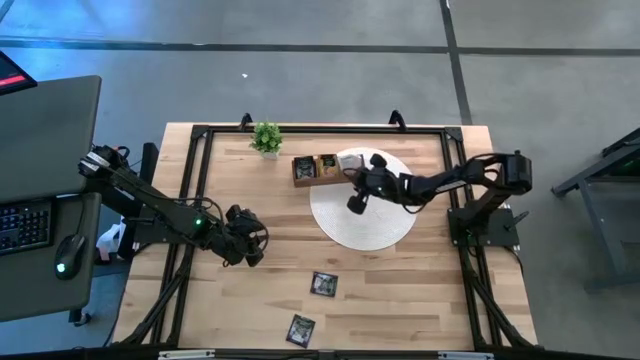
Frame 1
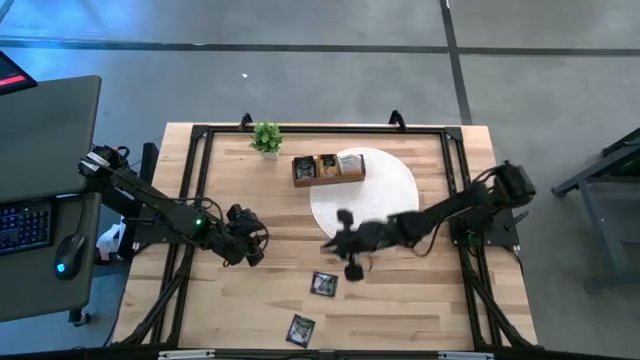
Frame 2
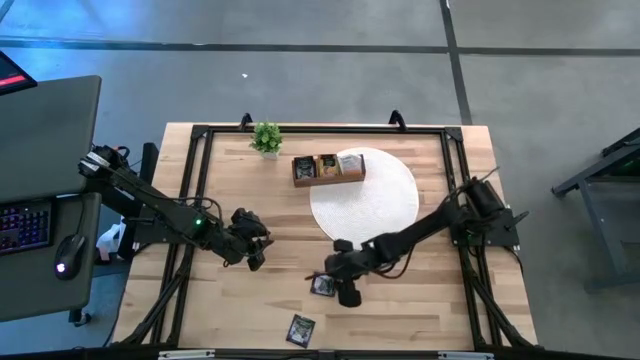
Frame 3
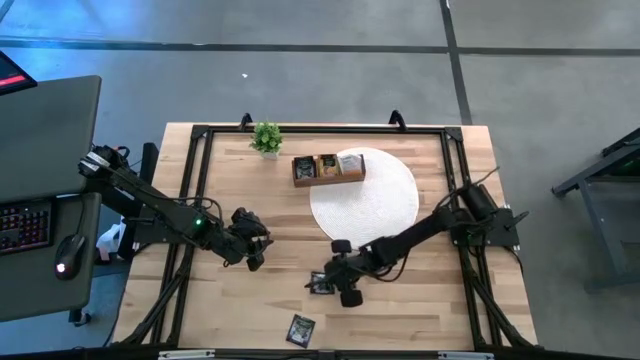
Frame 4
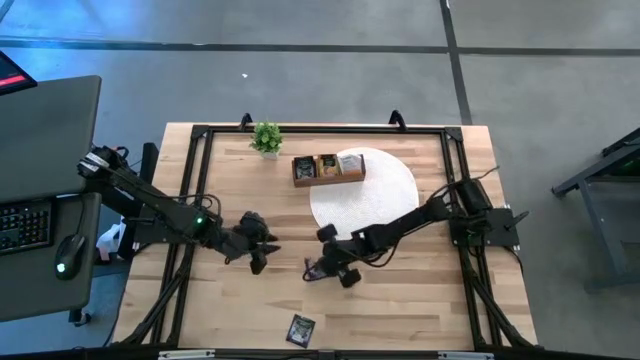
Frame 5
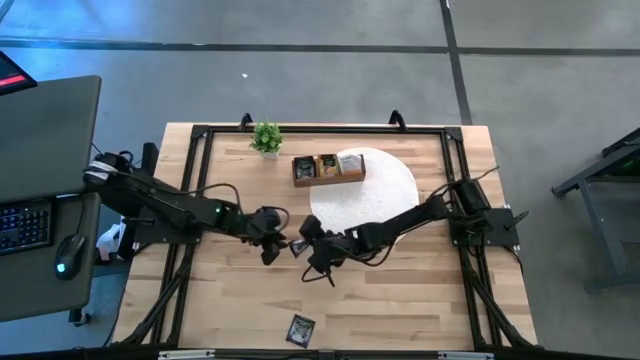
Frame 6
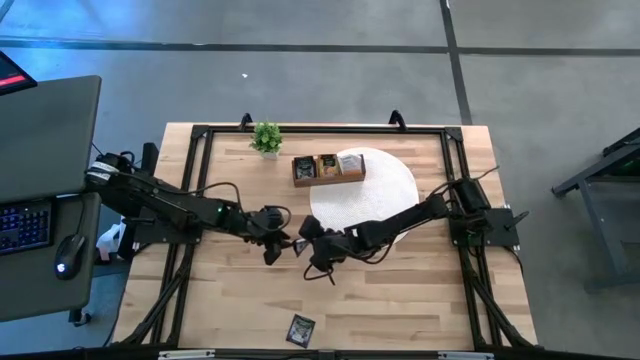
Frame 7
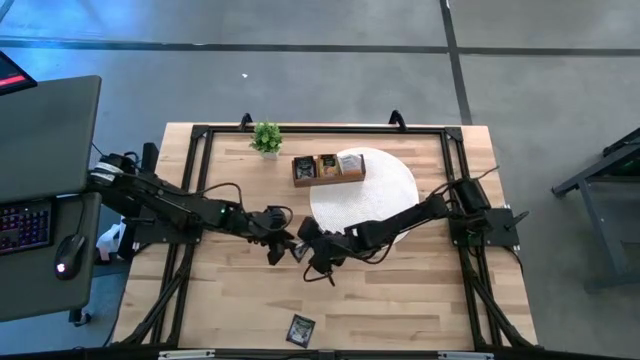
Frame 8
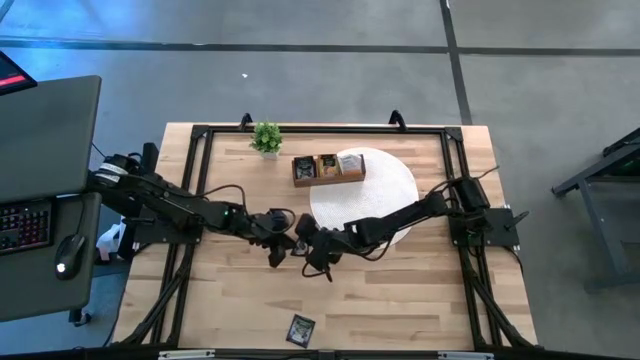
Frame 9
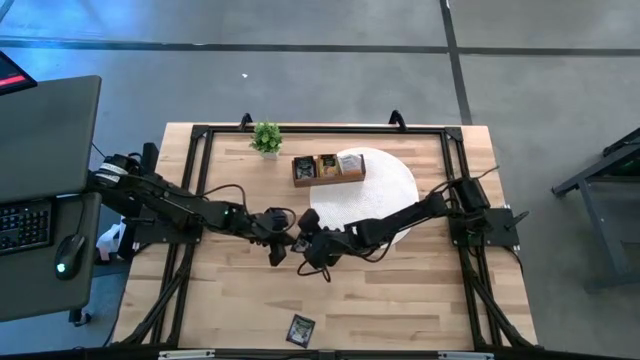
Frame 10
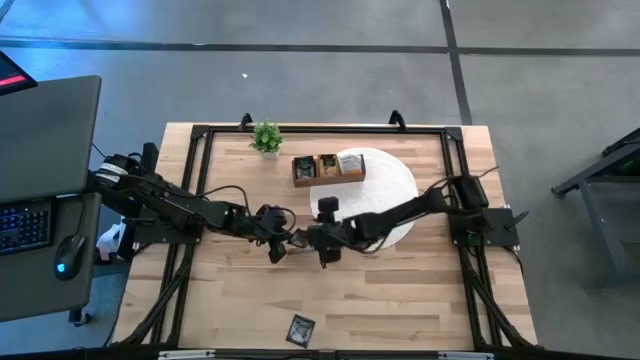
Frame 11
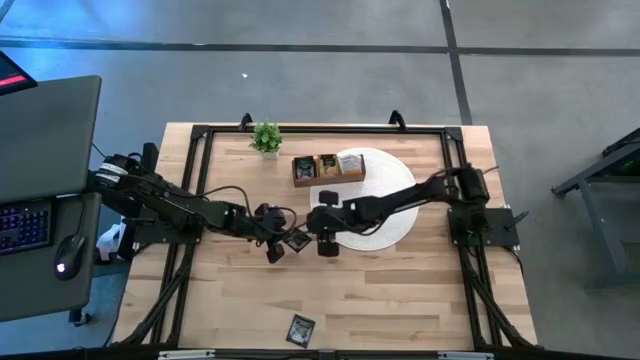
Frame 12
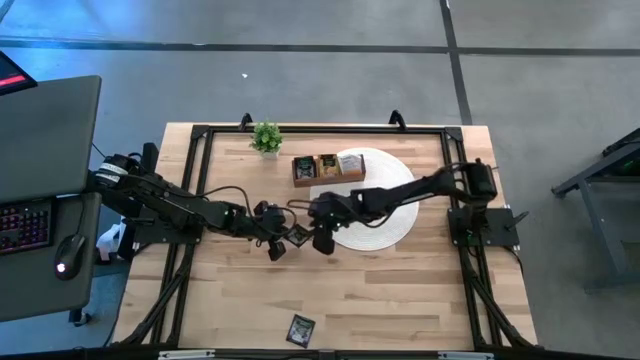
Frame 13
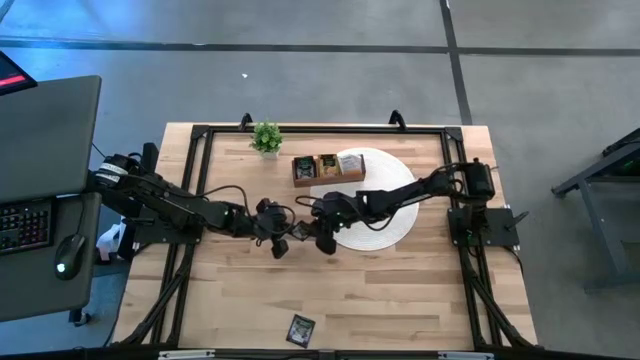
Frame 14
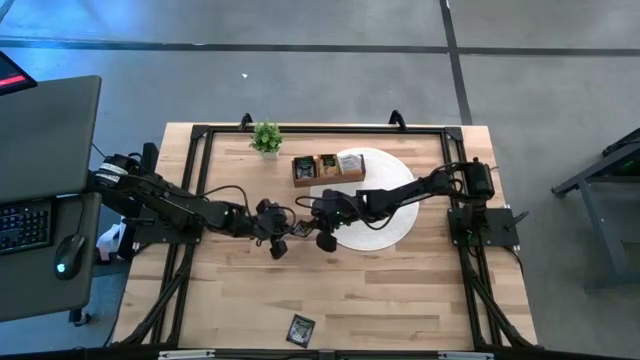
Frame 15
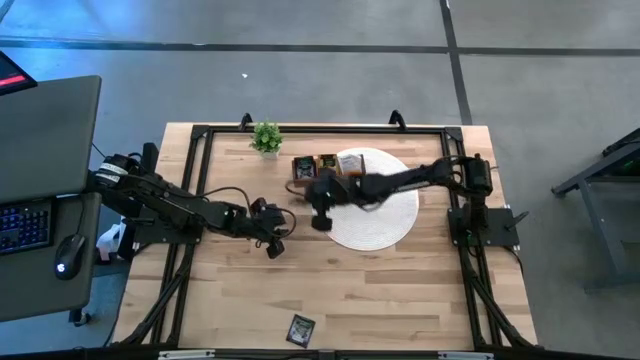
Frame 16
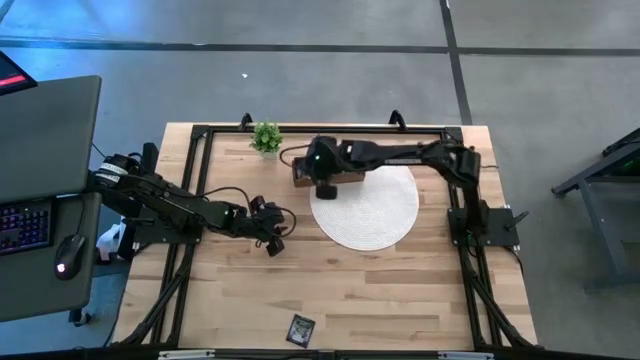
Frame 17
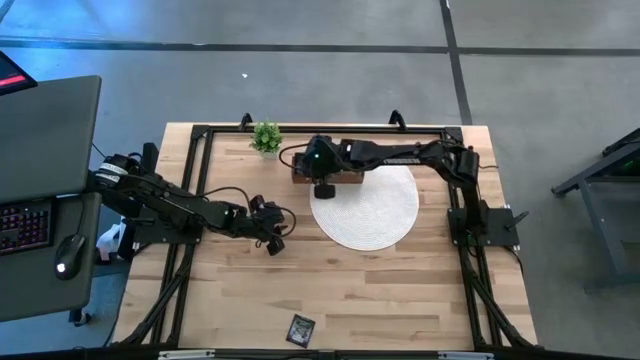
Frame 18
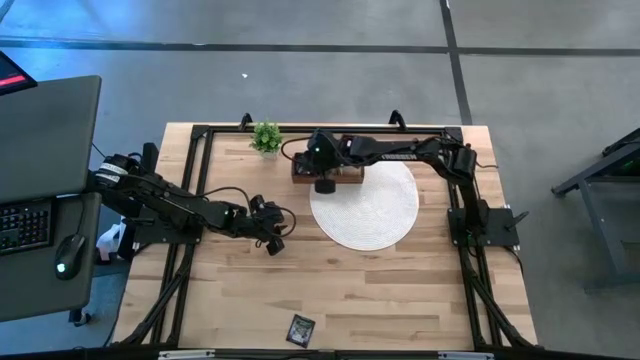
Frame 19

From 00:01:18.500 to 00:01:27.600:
Task: Pick & Place Tea
Put the violet tea bag into the left section of the wooden organizer

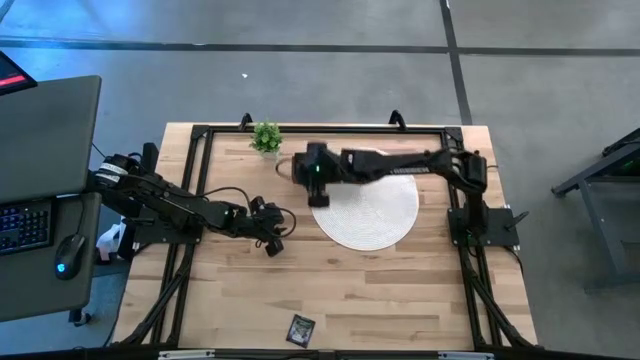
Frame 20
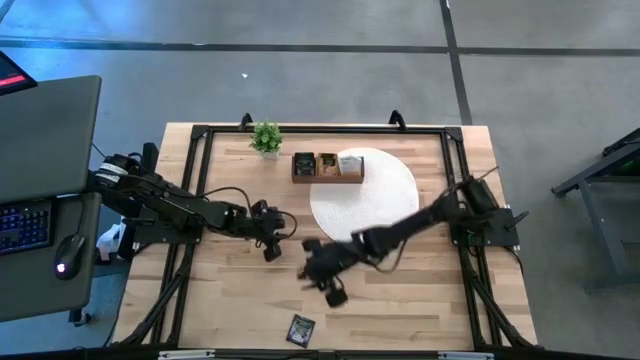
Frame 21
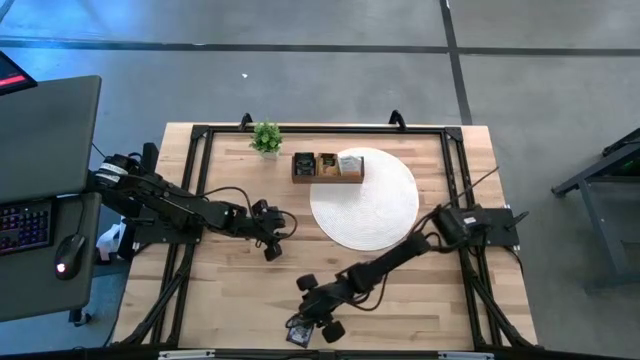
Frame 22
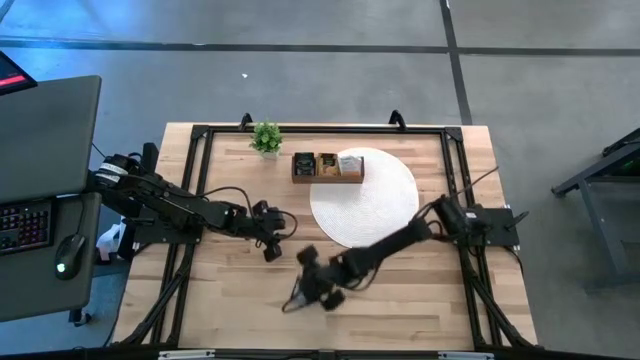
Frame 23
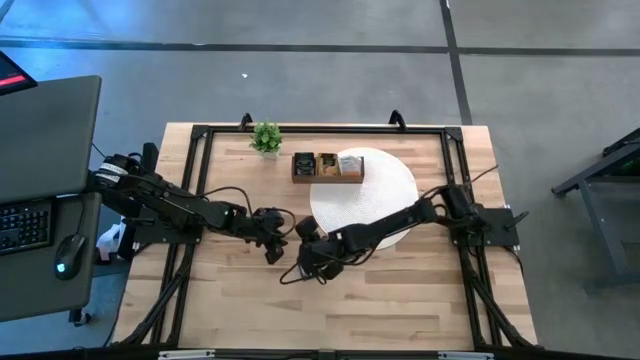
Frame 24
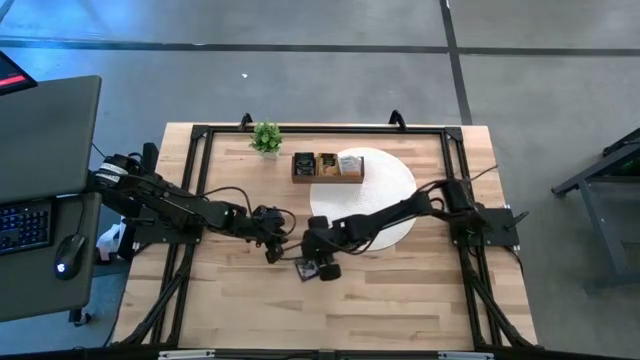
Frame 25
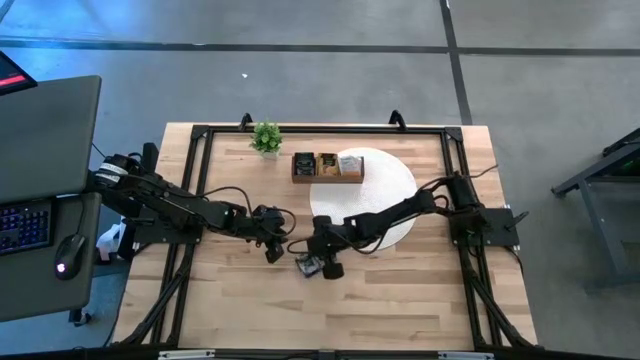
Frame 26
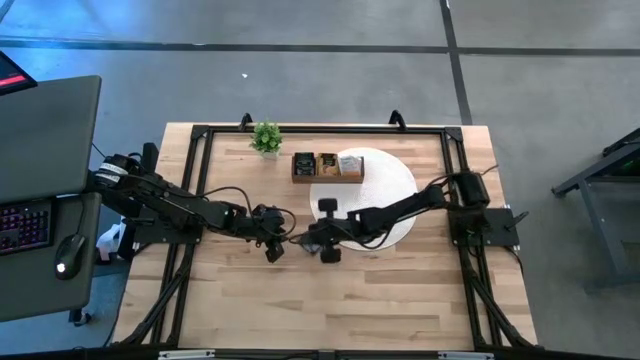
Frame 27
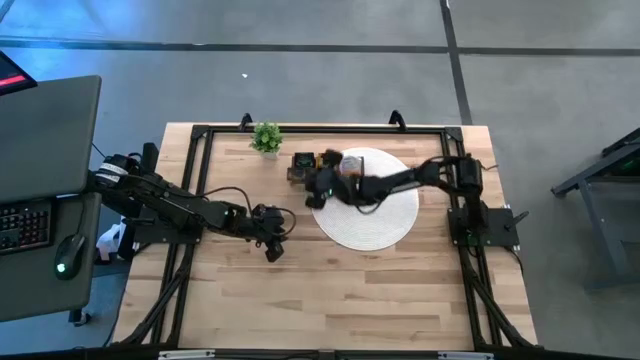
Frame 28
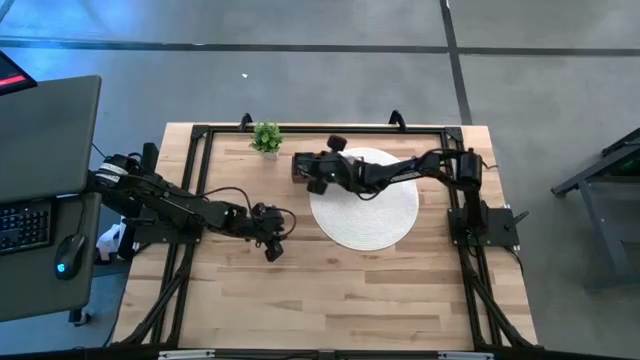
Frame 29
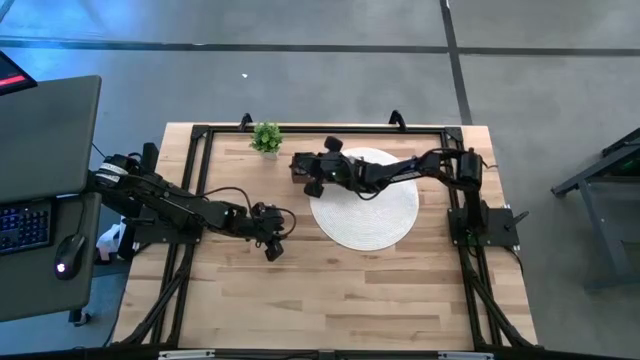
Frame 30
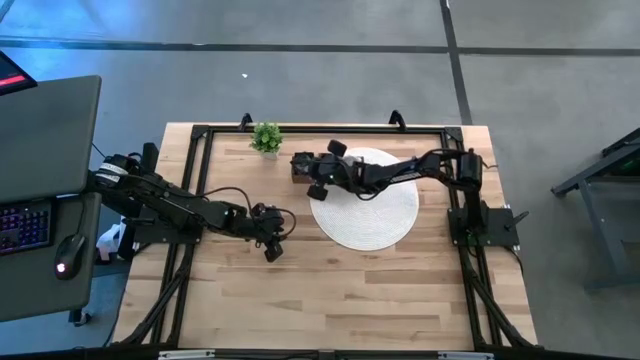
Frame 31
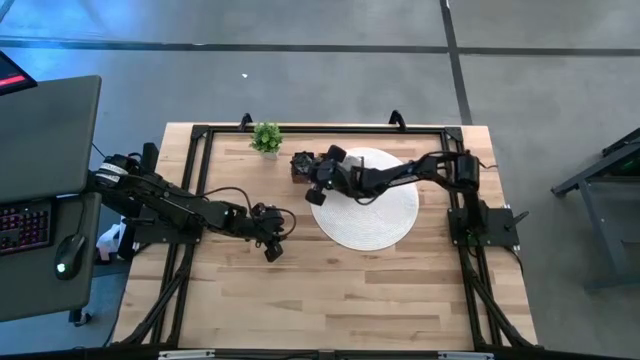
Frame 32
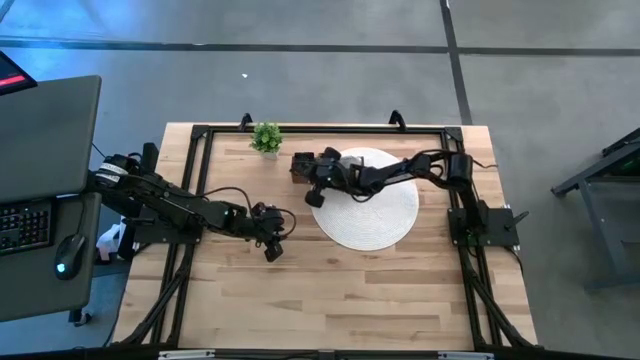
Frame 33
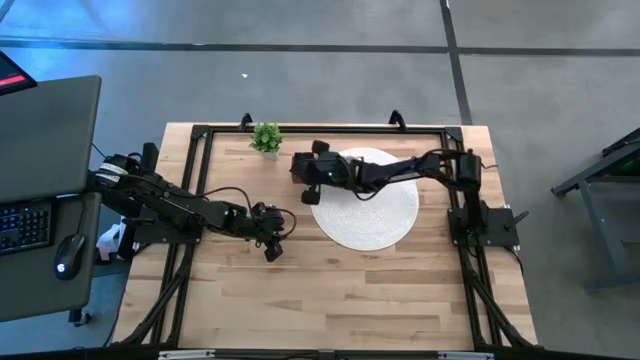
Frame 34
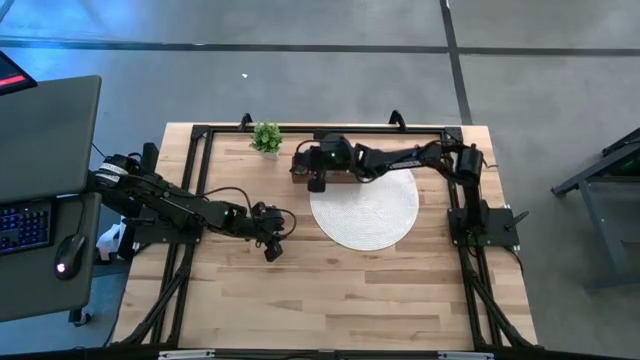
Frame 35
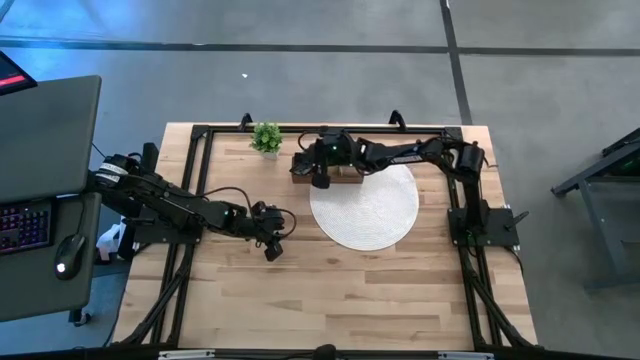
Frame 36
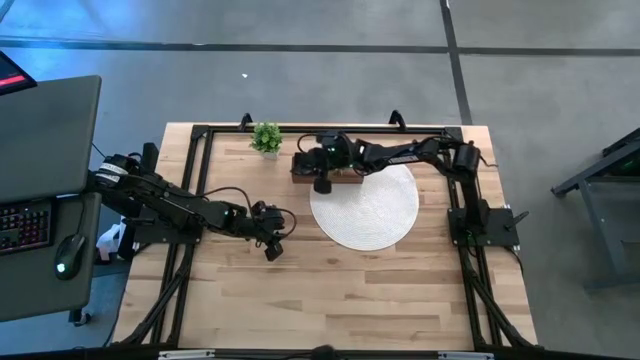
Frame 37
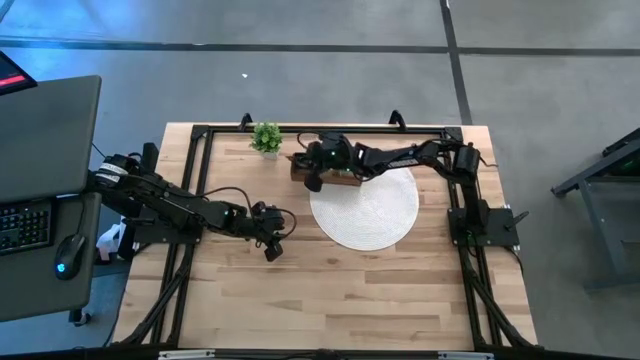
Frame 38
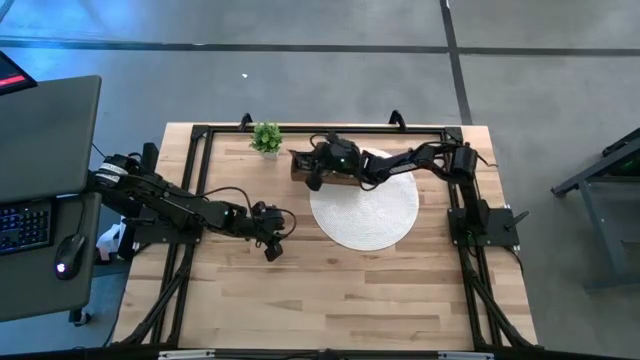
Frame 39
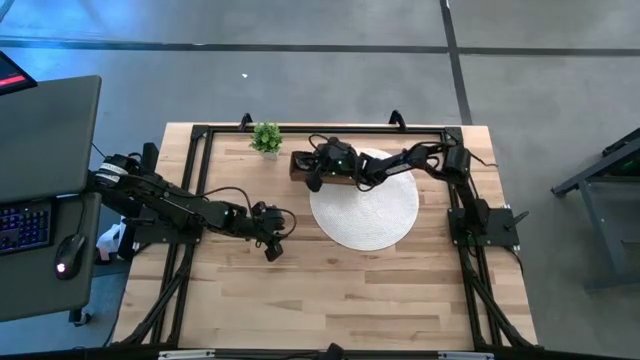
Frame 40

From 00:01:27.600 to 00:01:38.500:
Put the violet tea bag into the left section of the wooden organizer

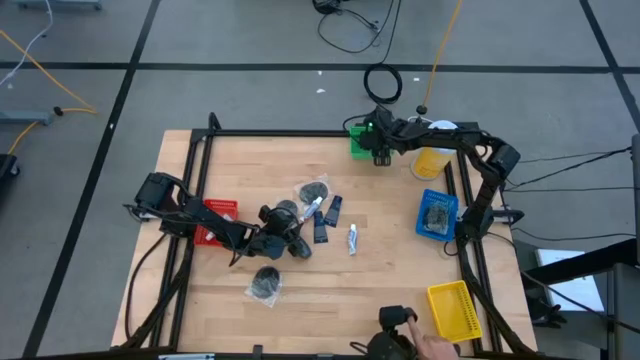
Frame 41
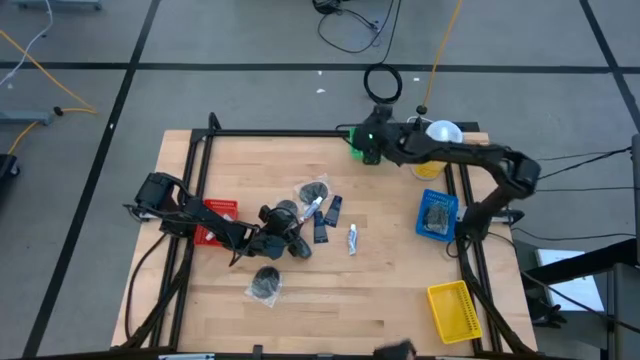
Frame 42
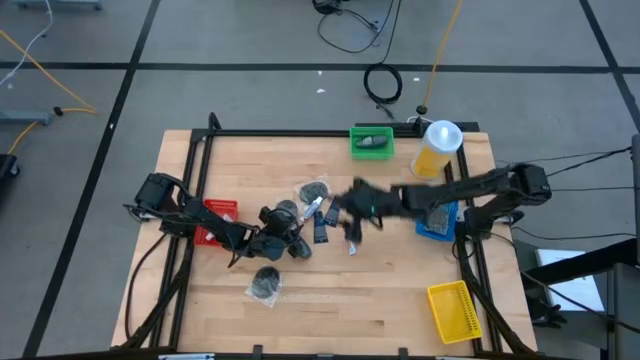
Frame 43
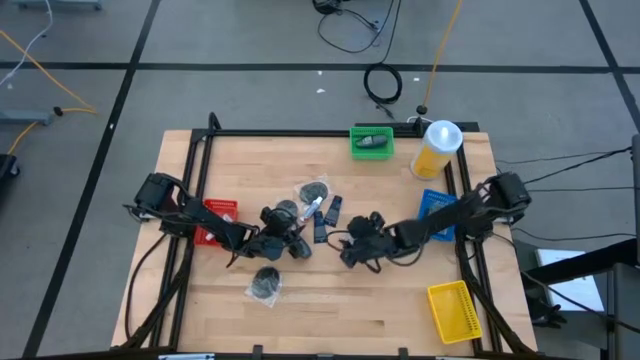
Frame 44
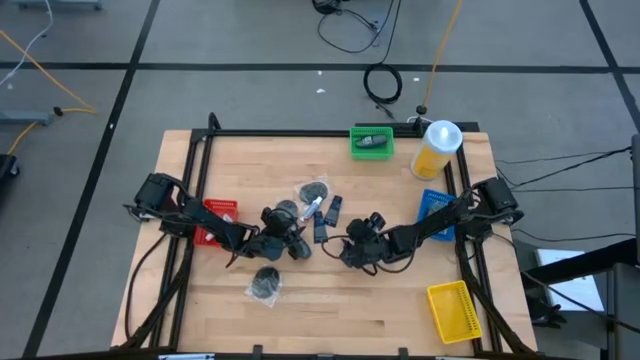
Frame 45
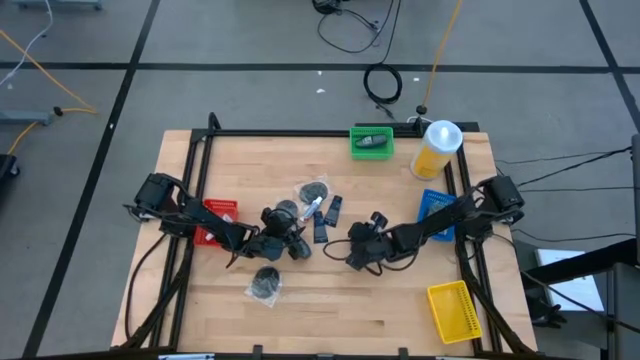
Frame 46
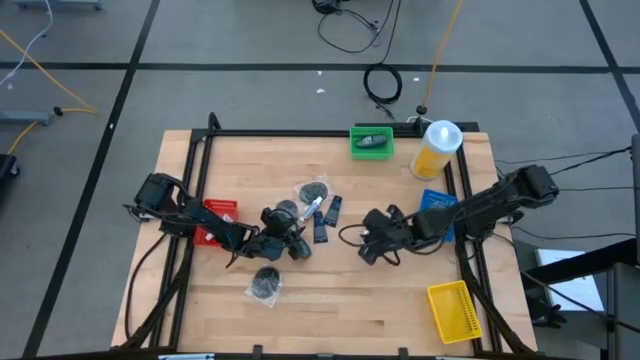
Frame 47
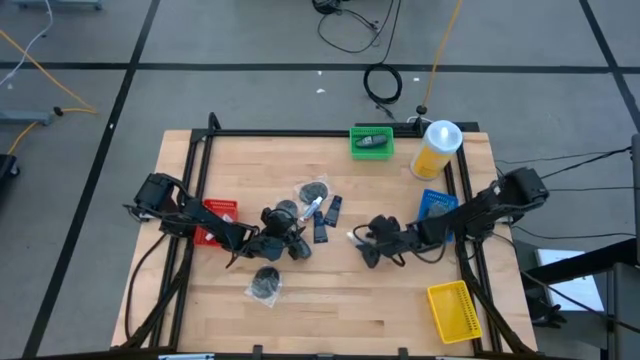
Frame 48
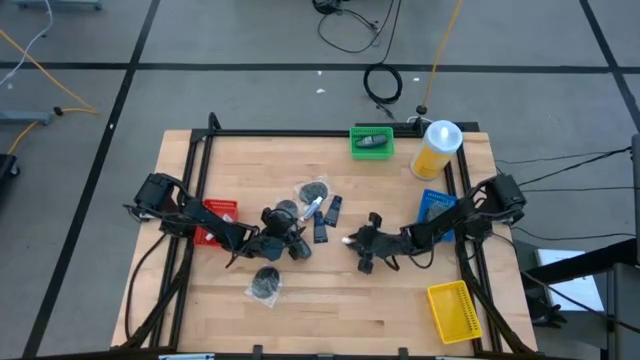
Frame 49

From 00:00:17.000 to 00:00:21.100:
Task: Pick & Place Travel size toiletries
Put the white toothpaste into the red bin
